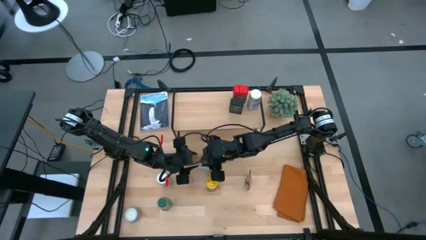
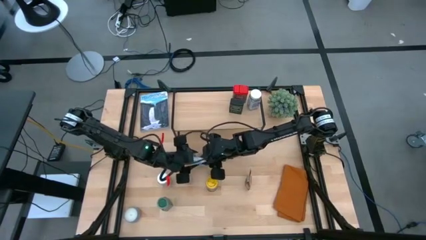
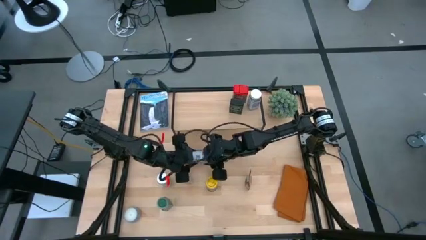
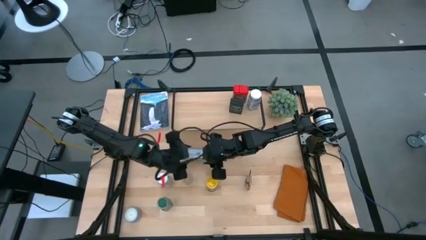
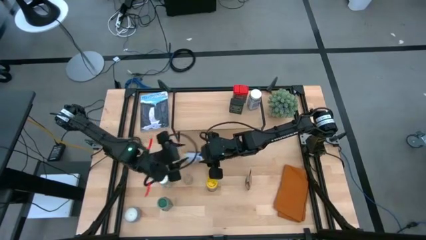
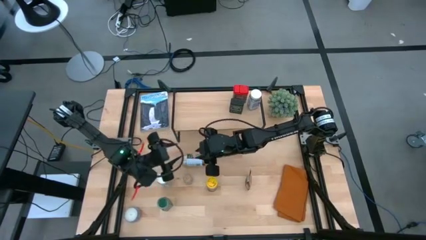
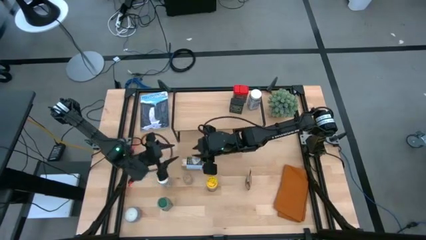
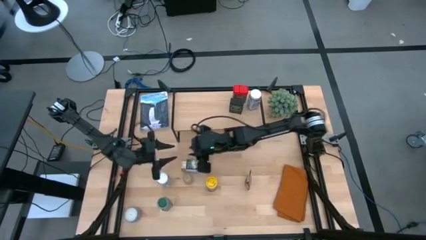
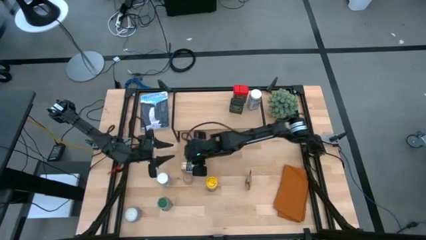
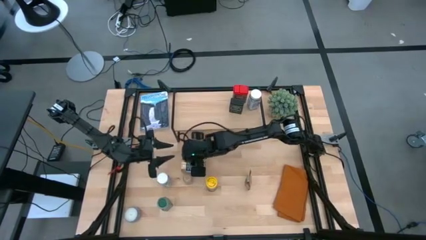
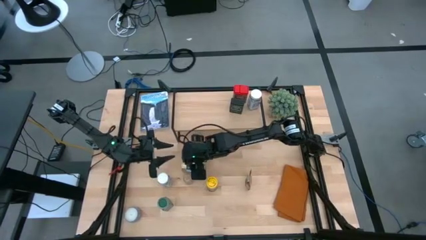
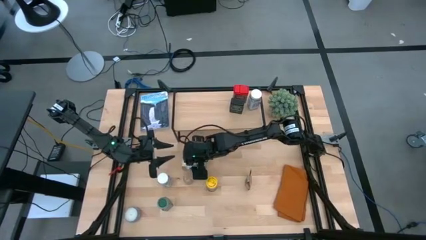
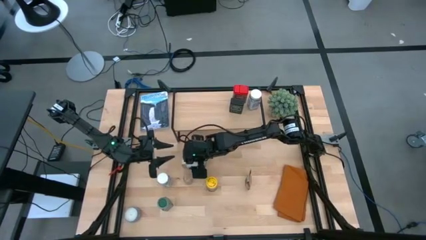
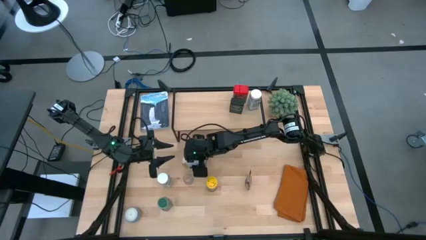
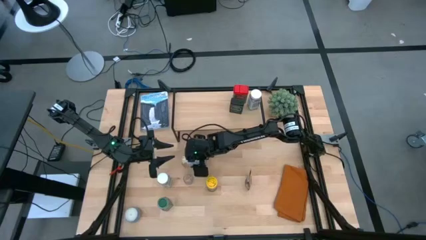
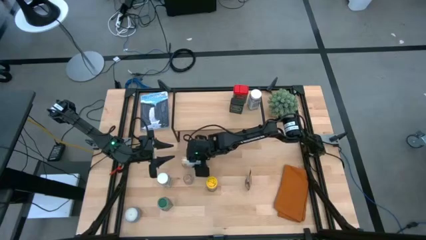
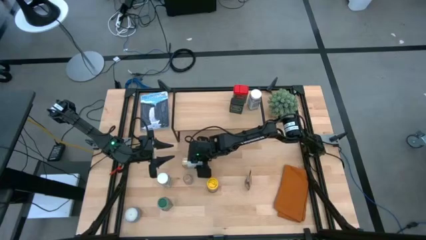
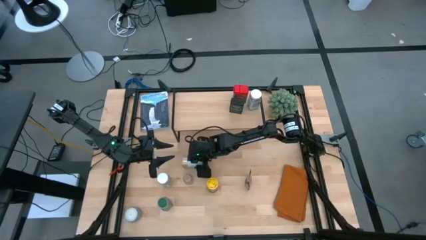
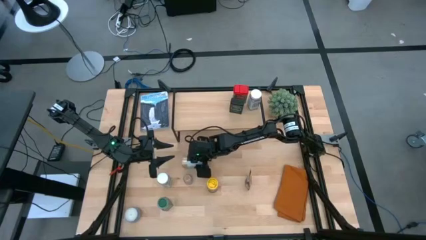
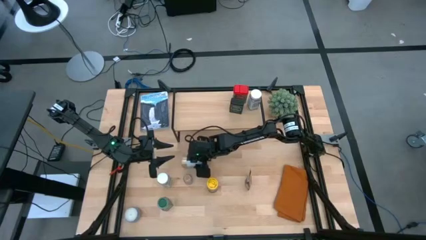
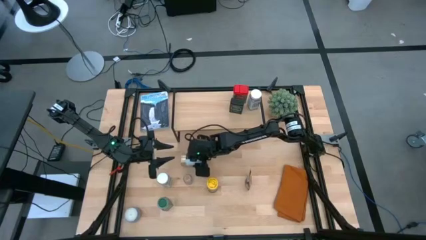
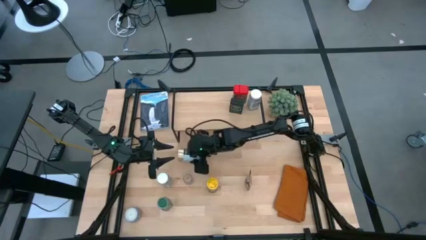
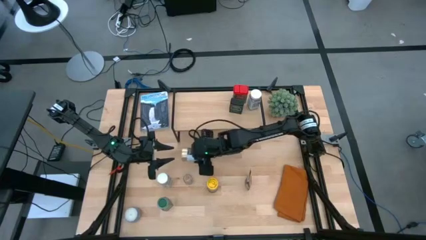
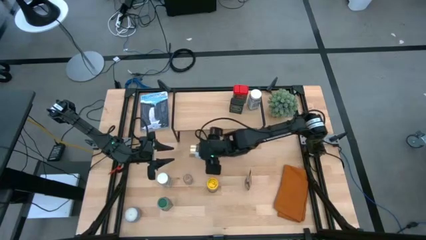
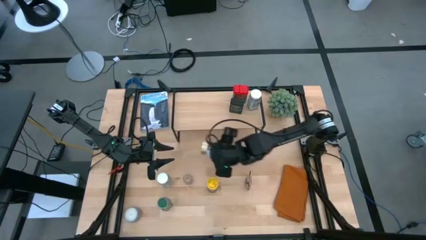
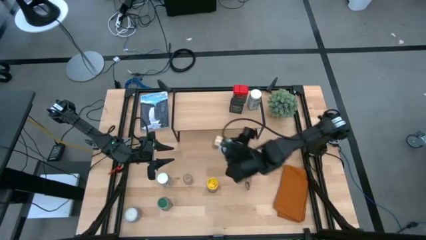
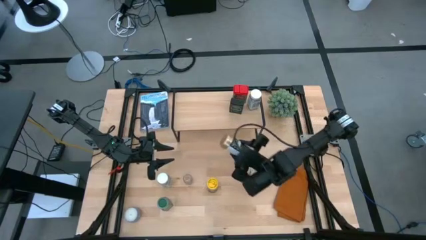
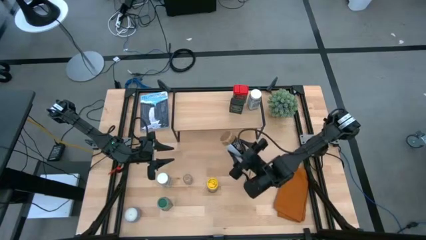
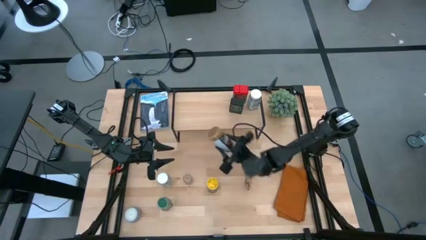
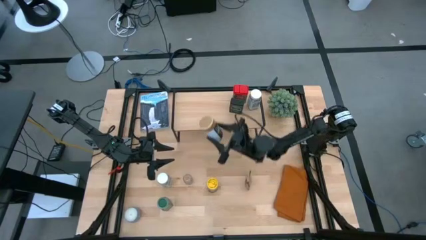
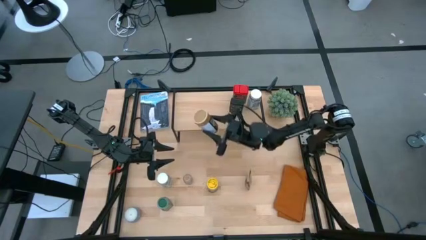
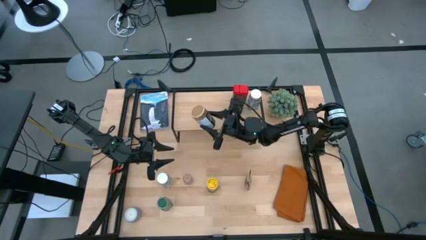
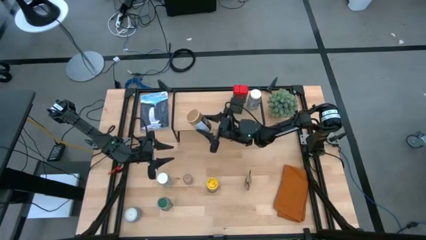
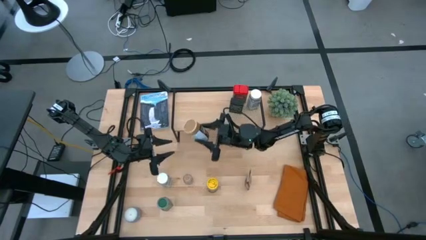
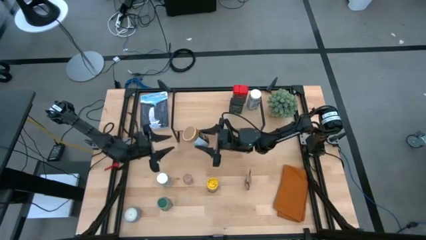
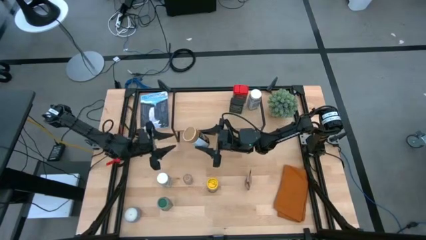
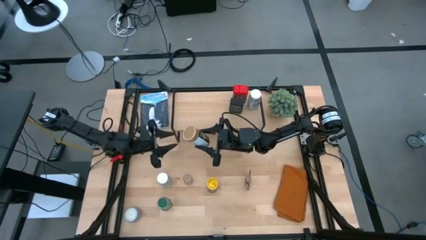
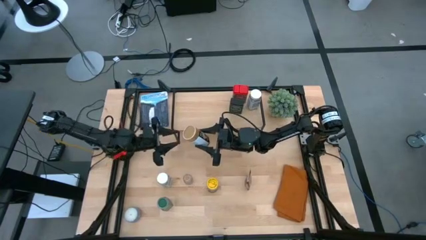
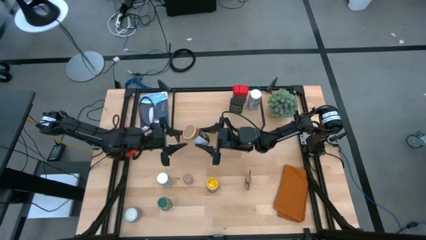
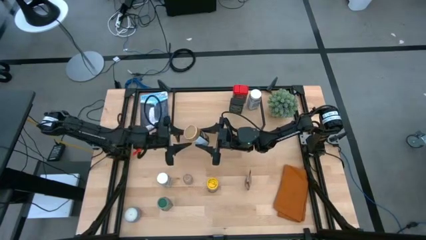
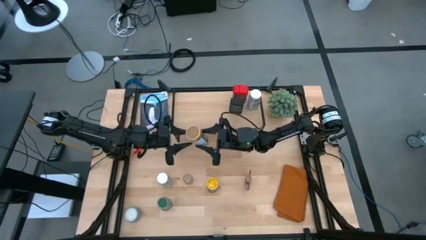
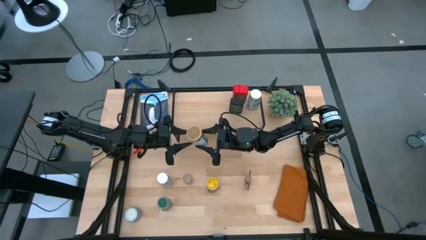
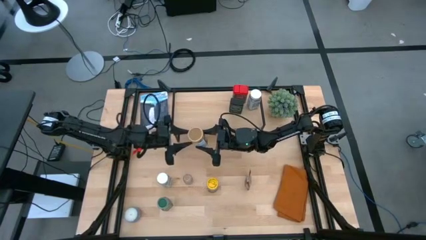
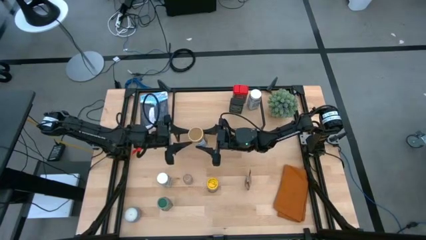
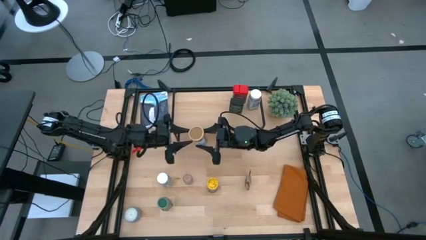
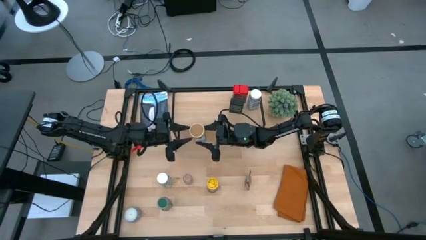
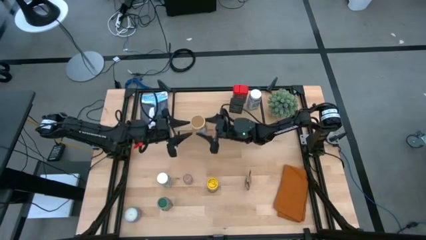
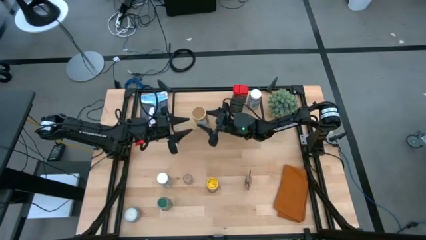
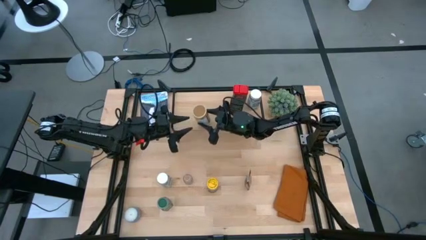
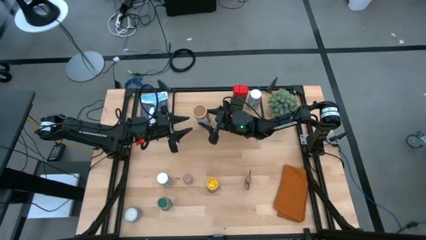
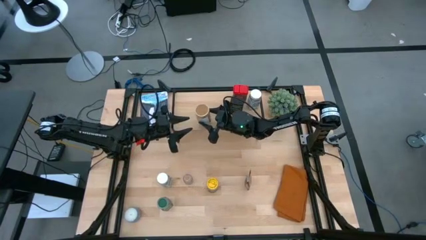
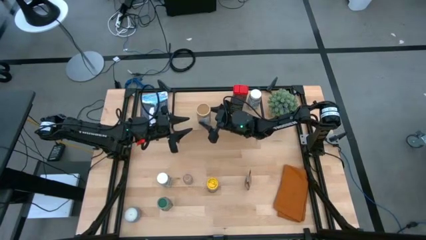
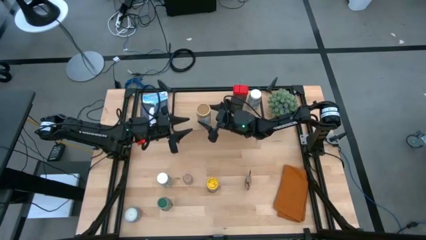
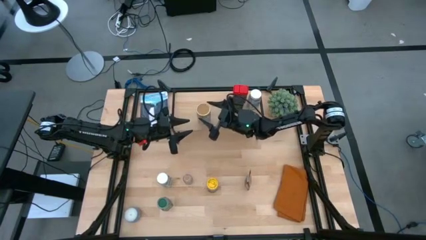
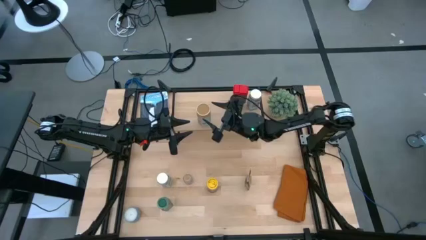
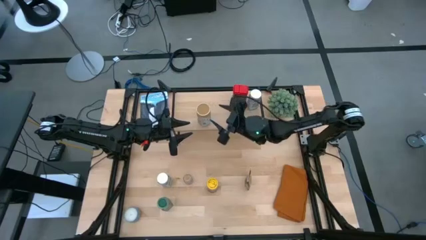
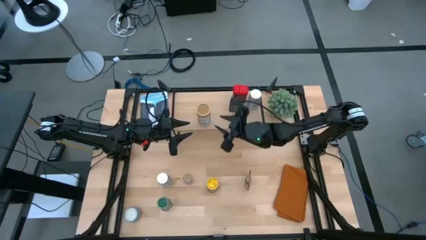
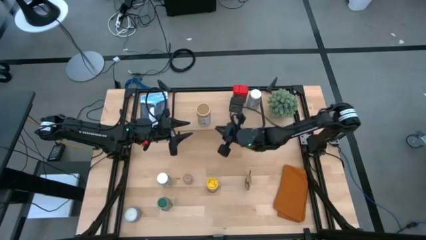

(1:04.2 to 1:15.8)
Task: Shelf spices
Put the golden seasoning bottle on the shelf aligned with the other red seasoning can
